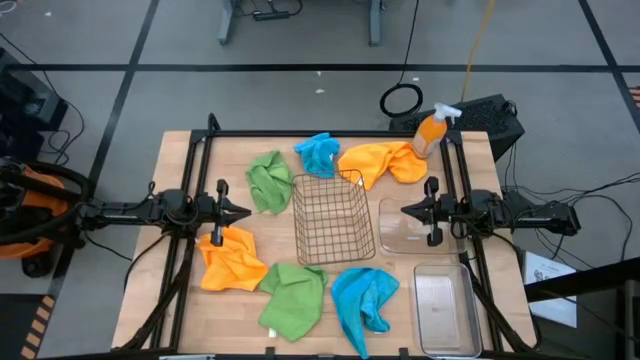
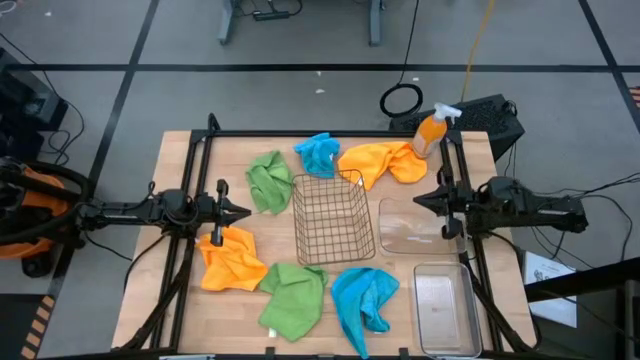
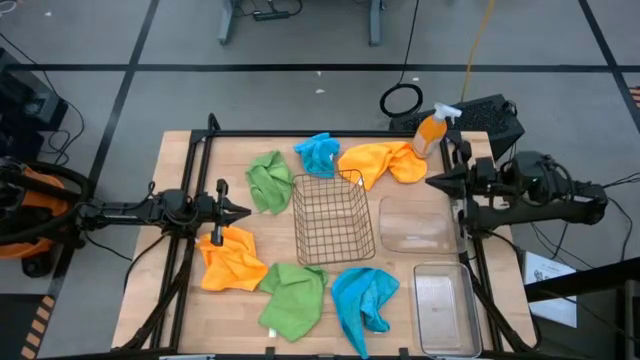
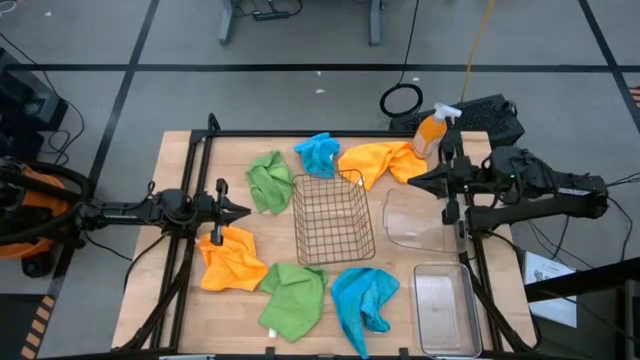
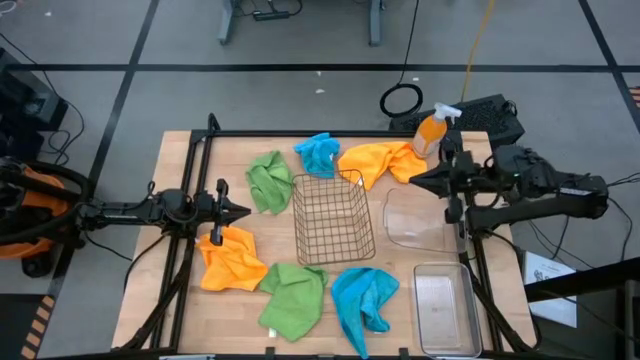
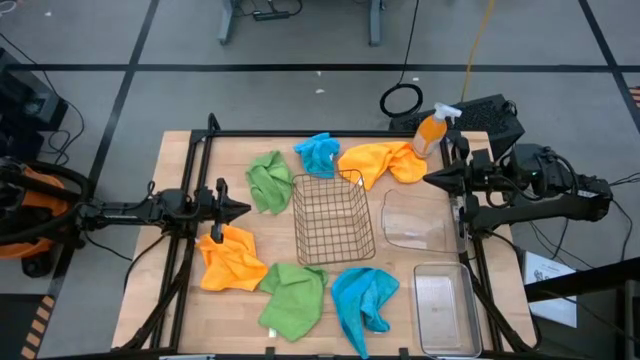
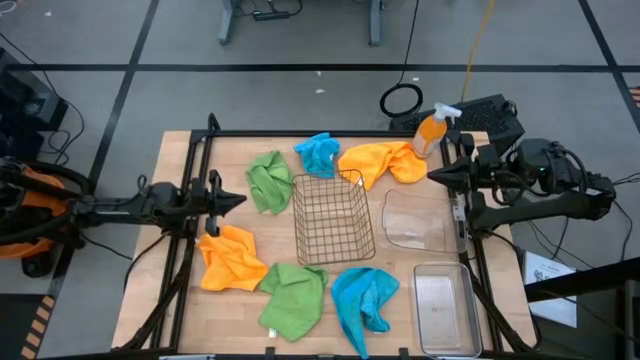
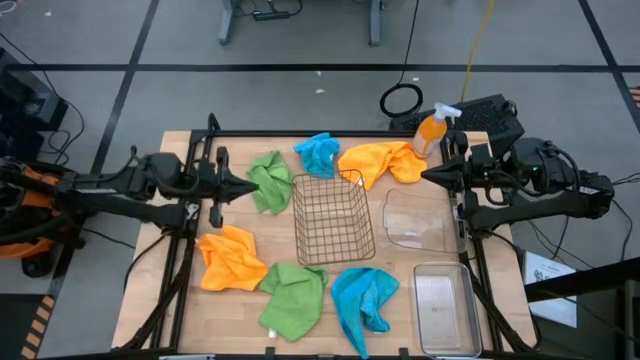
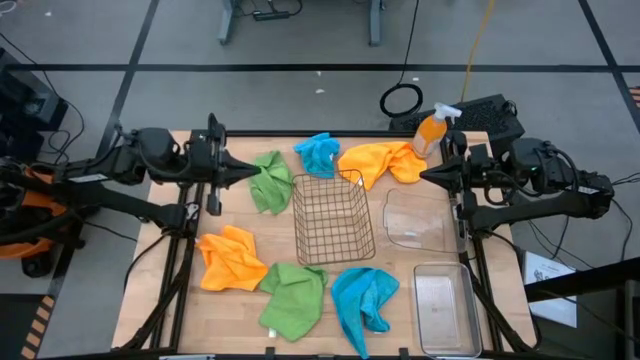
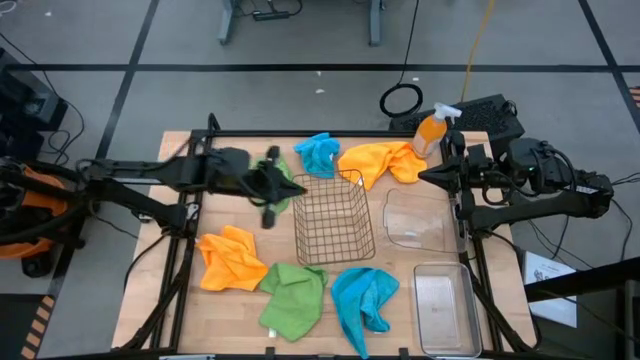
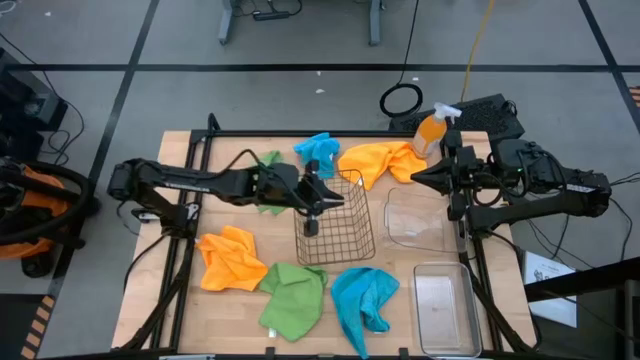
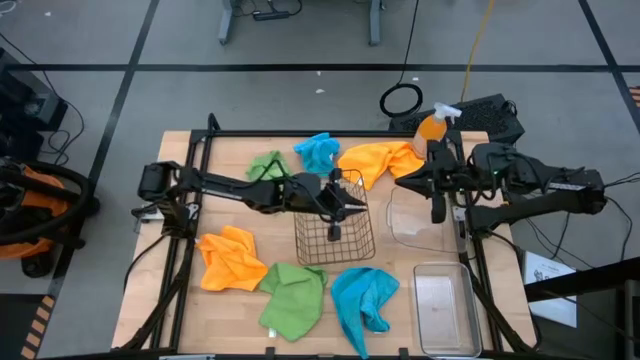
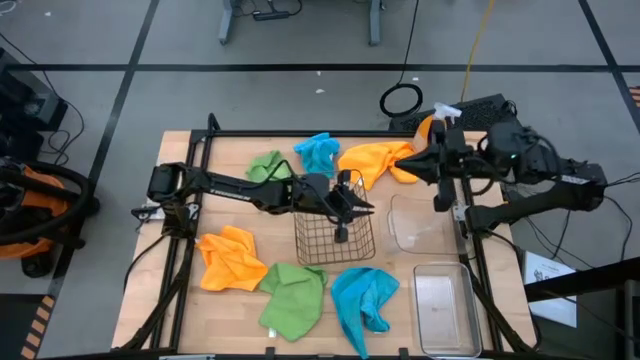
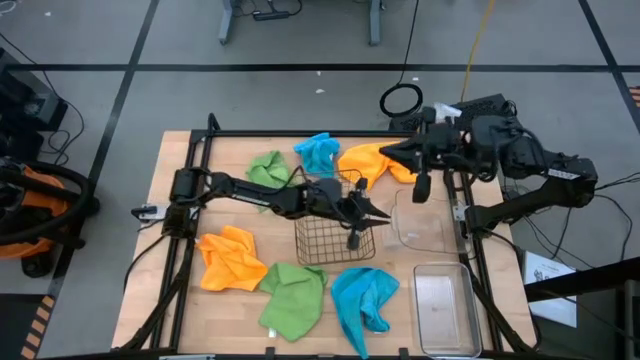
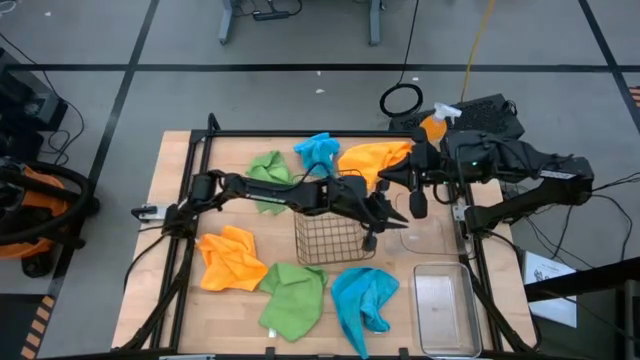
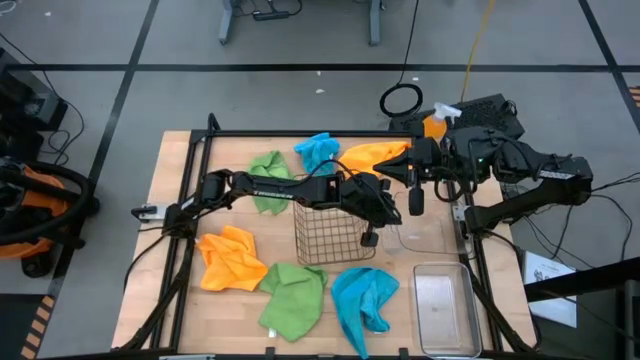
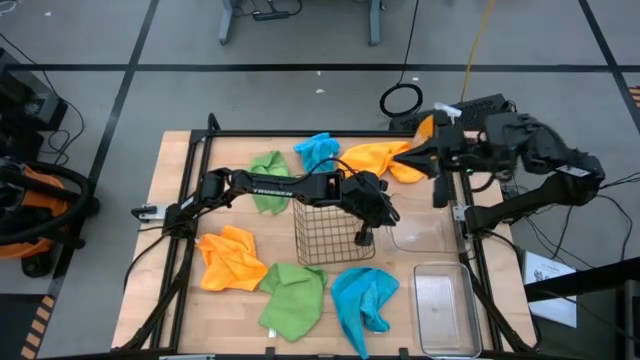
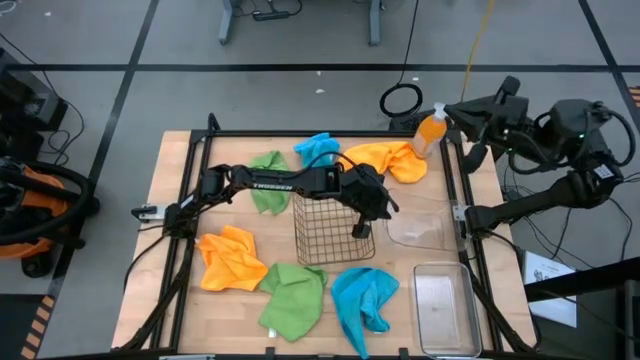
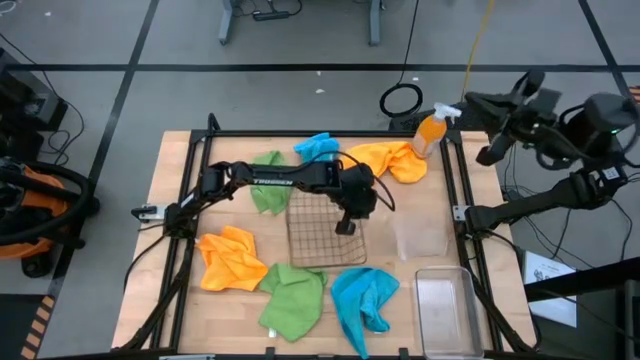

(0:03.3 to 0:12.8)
Task: Sort microfiber towel by color & place in baskets
Adjust the top transparent bin

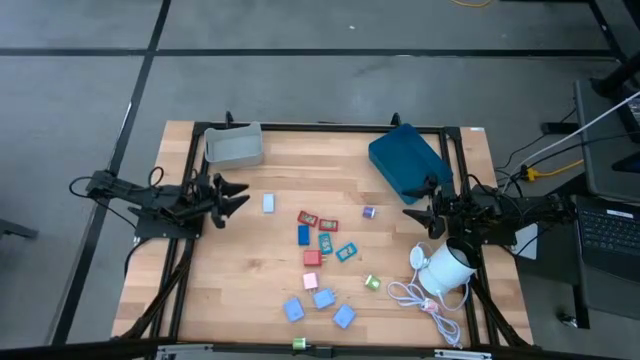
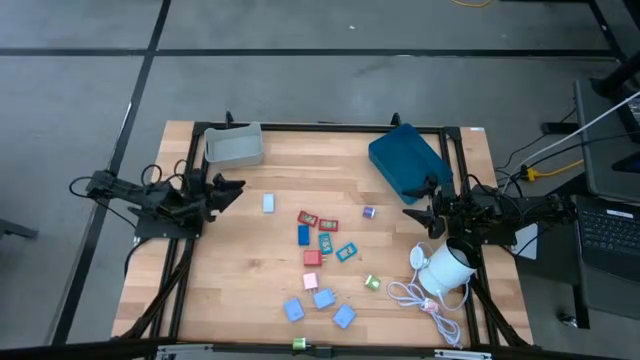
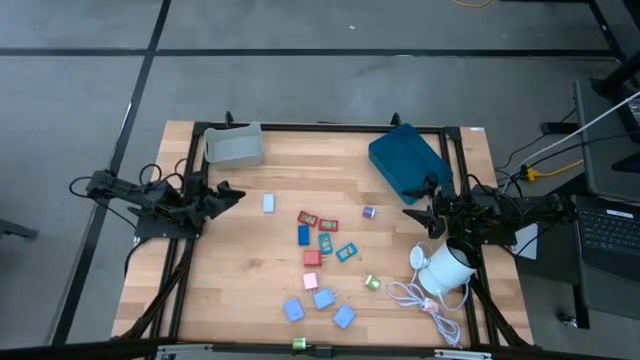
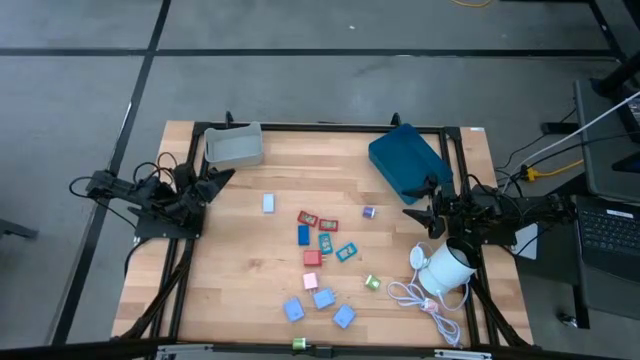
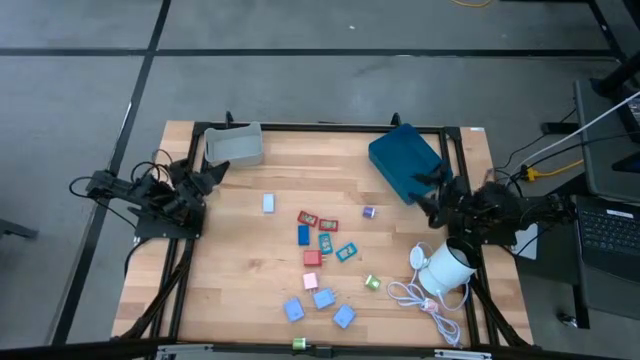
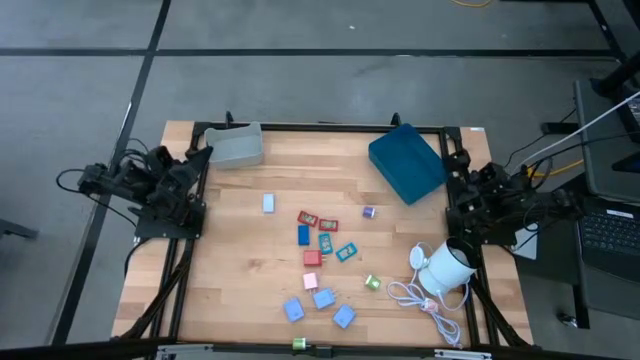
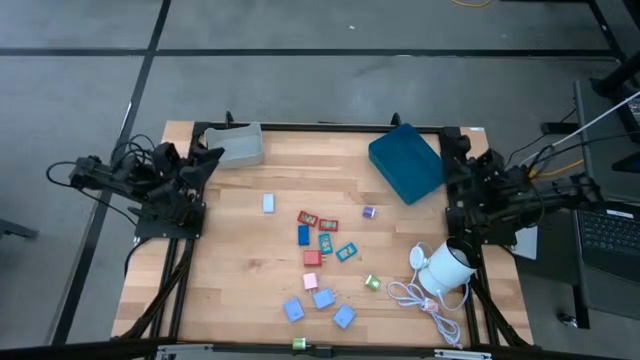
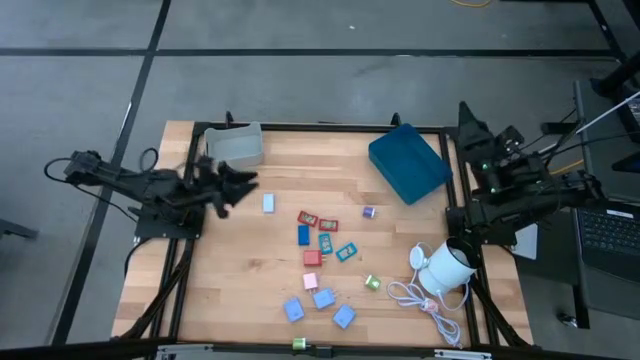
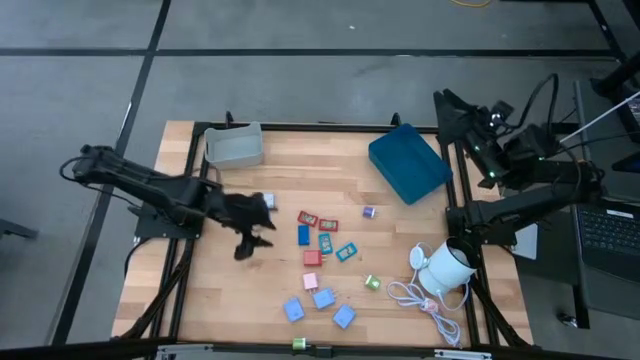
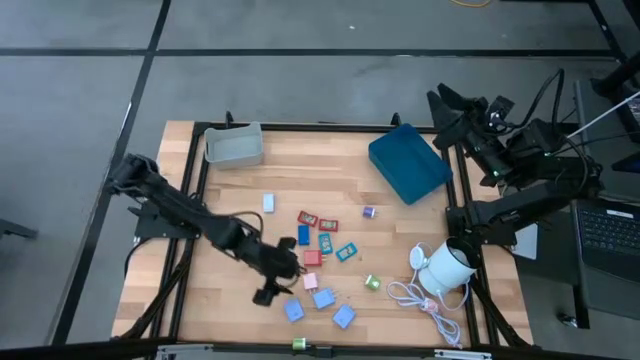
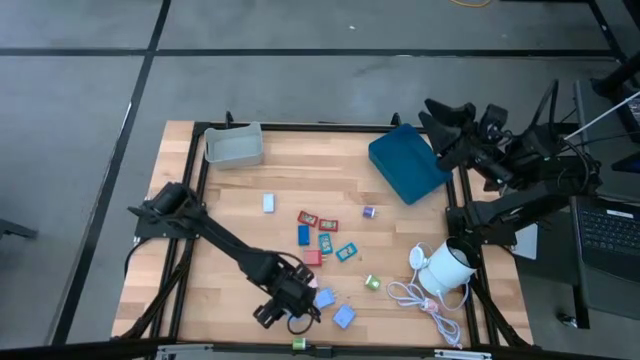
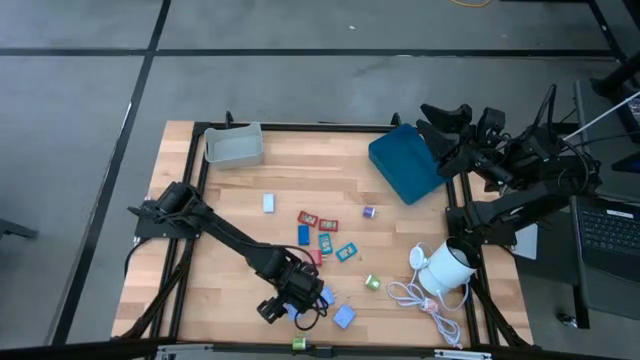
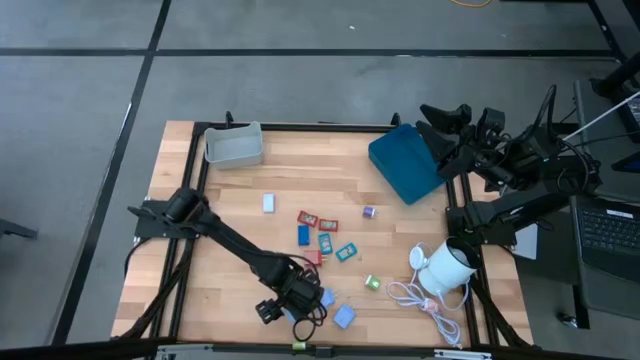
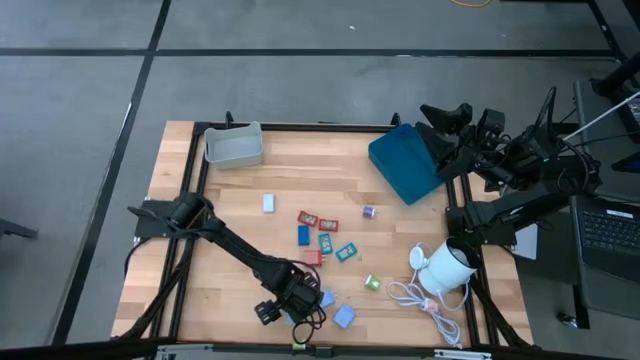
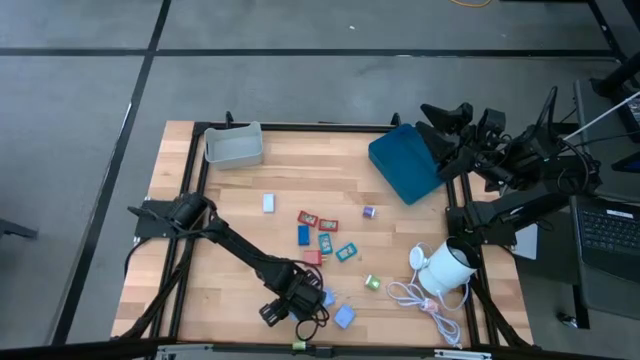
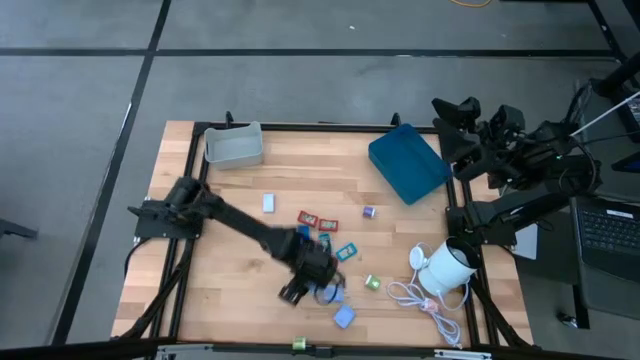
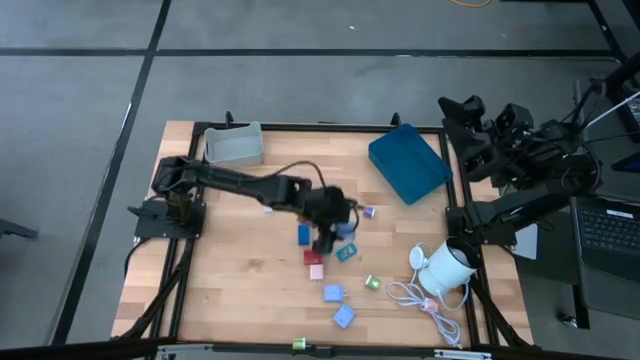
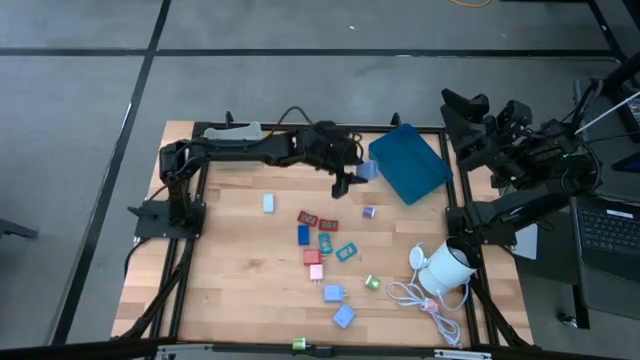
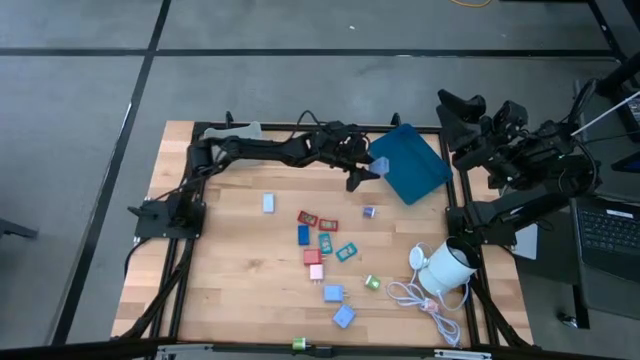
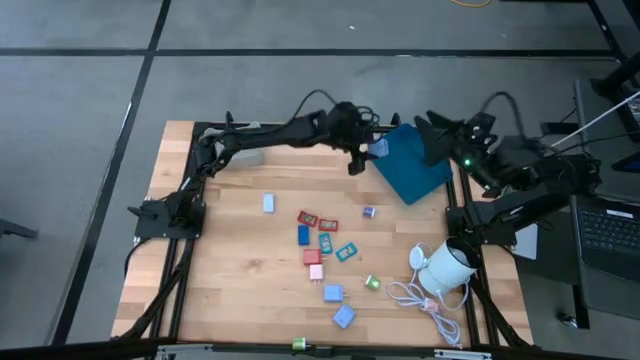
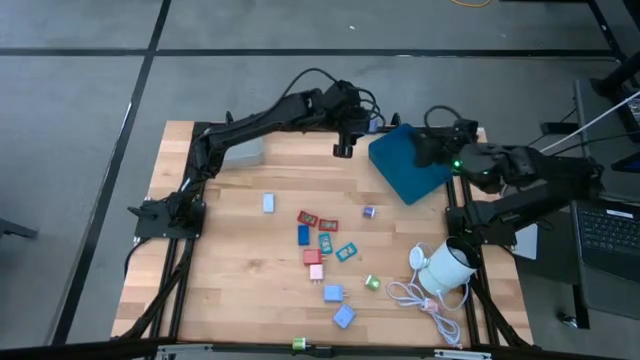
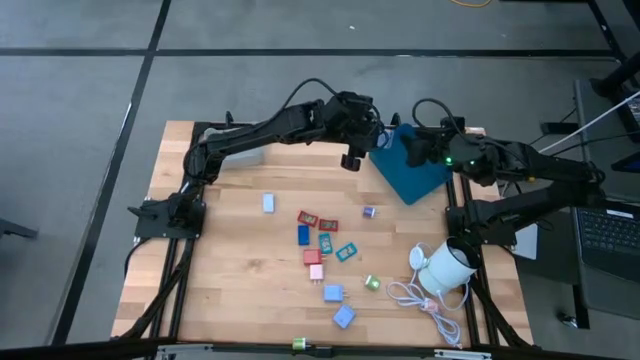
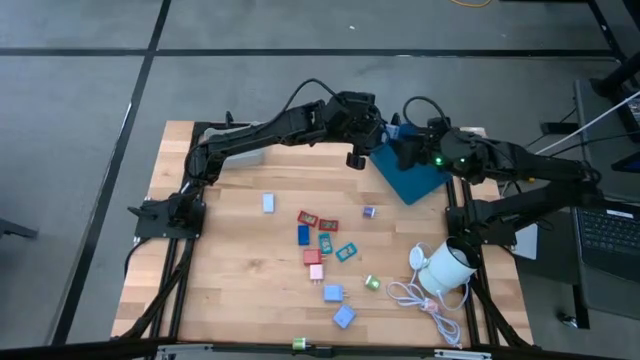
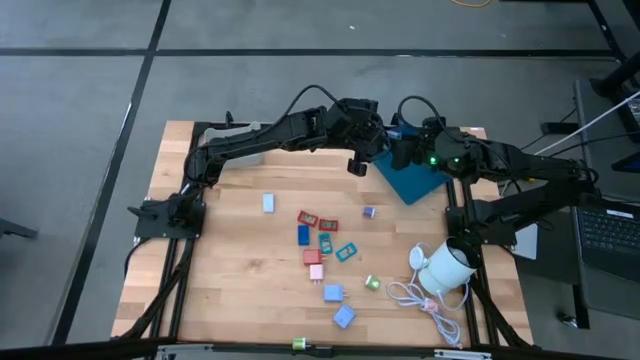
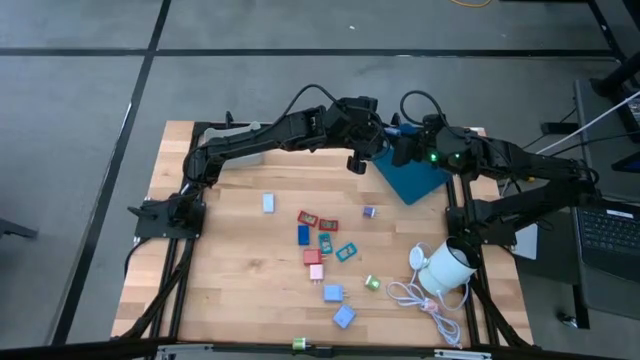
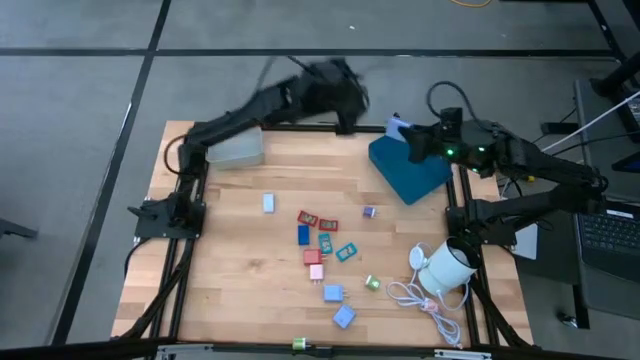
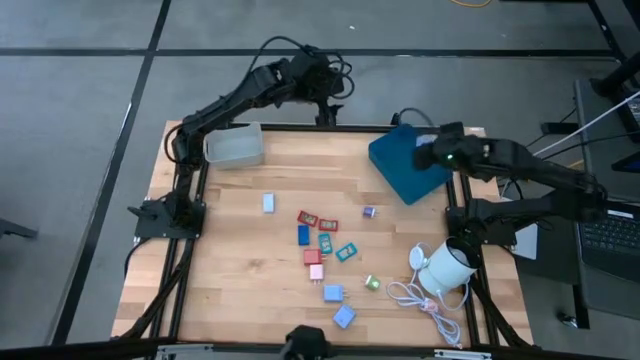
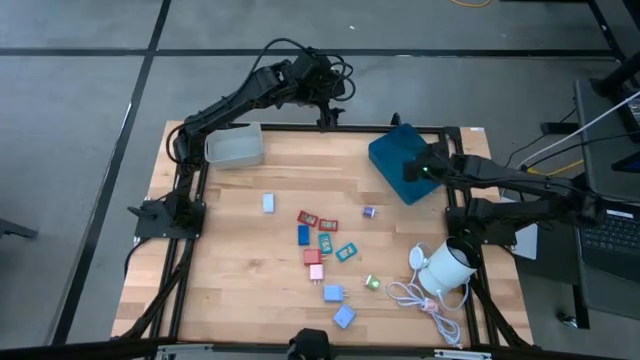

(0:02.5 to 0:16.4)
Task: Pick & Place Office items
Put the left sky blue charger adapter into the blue bin
